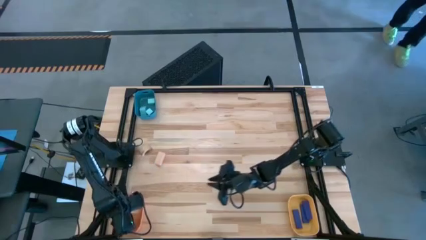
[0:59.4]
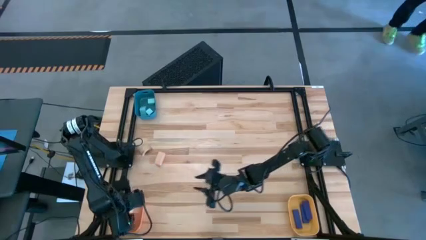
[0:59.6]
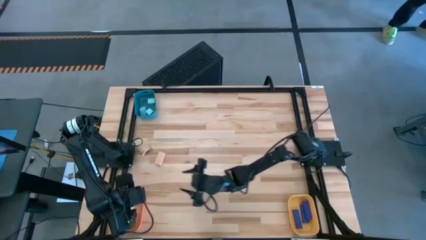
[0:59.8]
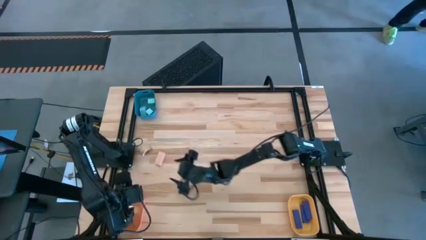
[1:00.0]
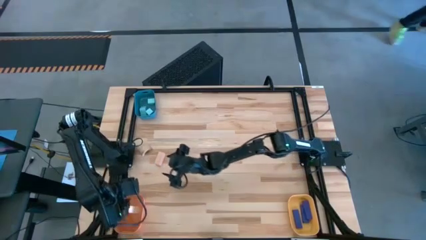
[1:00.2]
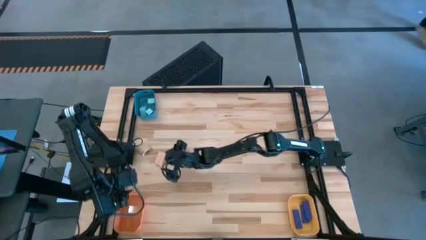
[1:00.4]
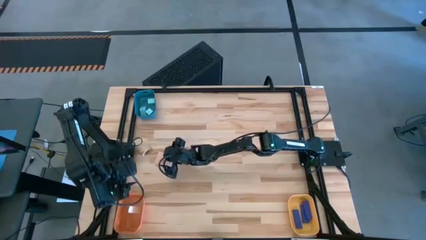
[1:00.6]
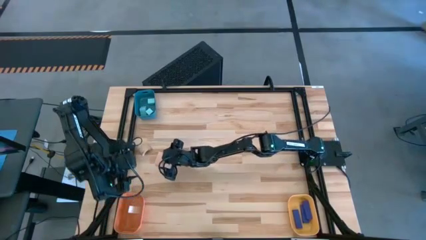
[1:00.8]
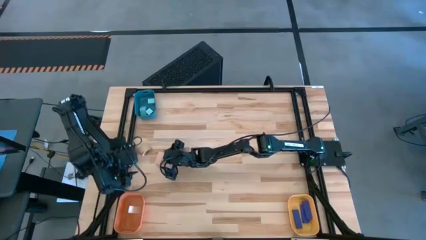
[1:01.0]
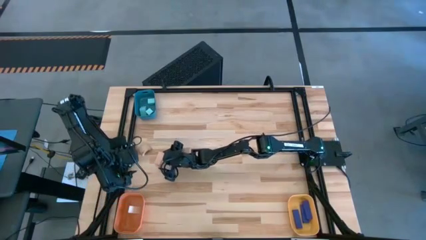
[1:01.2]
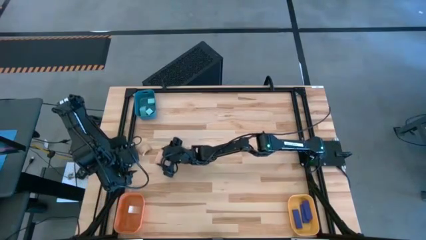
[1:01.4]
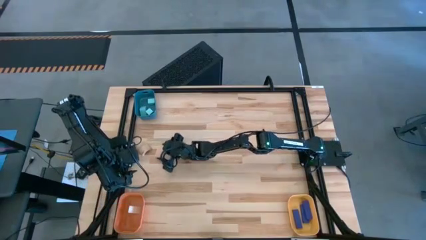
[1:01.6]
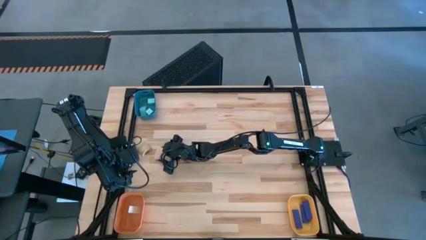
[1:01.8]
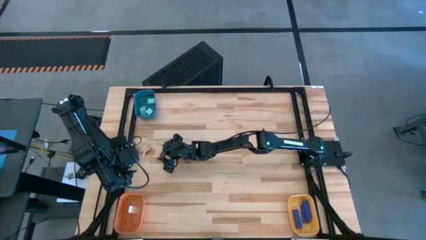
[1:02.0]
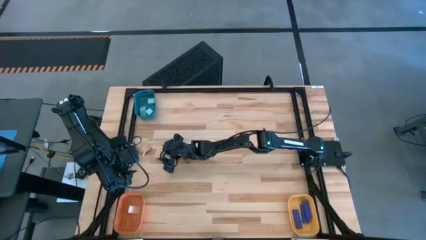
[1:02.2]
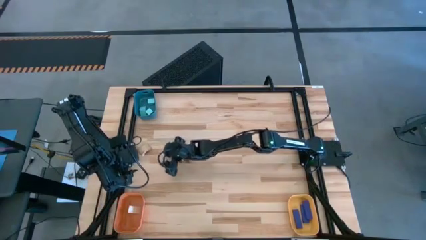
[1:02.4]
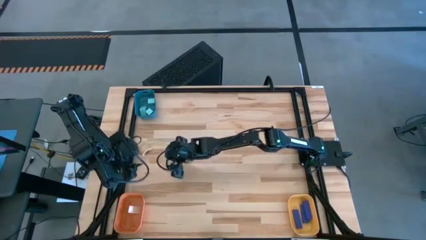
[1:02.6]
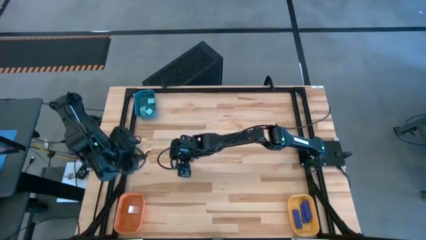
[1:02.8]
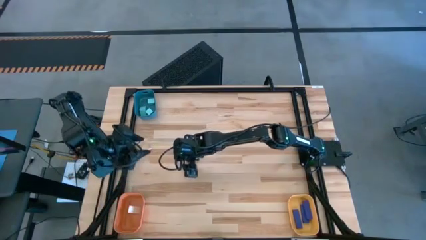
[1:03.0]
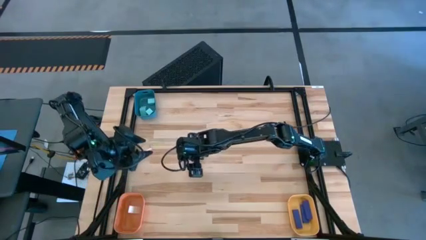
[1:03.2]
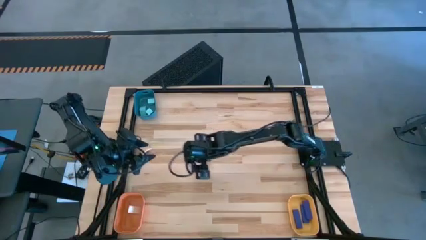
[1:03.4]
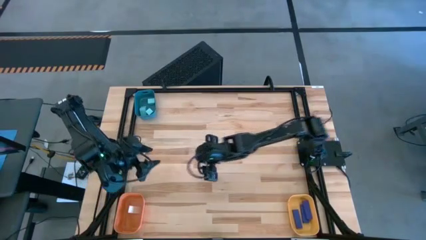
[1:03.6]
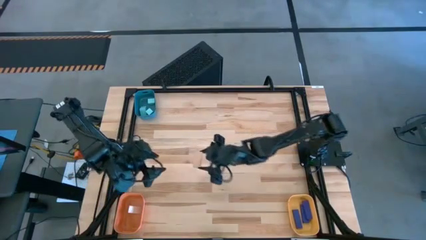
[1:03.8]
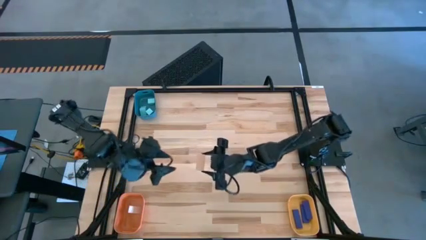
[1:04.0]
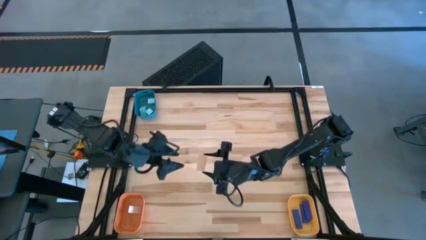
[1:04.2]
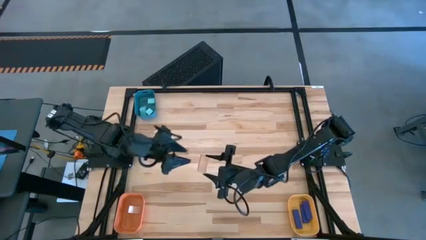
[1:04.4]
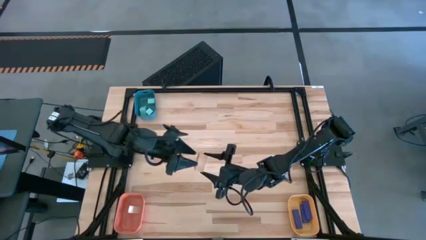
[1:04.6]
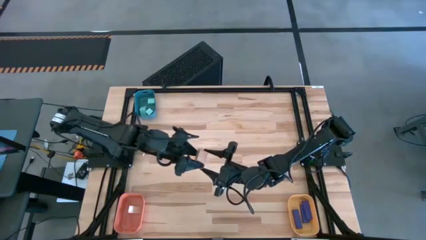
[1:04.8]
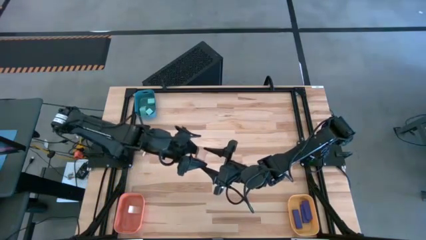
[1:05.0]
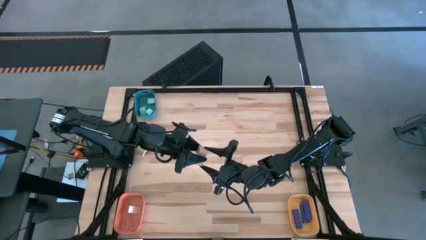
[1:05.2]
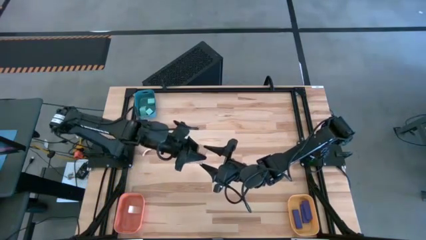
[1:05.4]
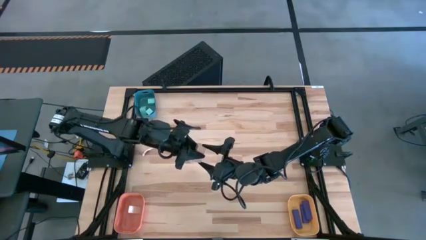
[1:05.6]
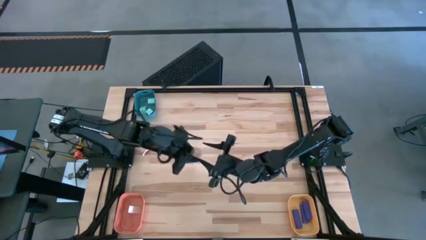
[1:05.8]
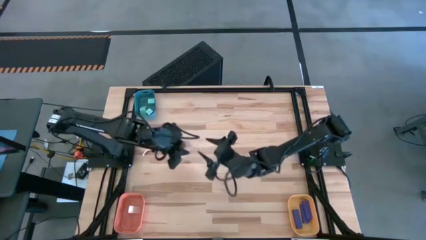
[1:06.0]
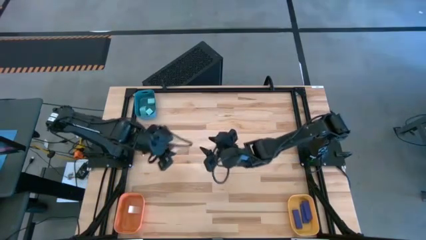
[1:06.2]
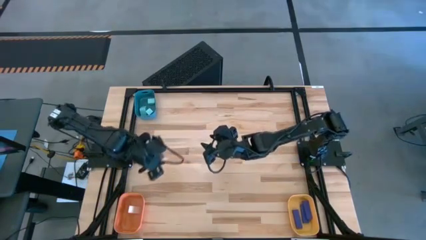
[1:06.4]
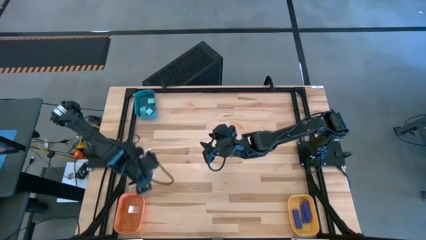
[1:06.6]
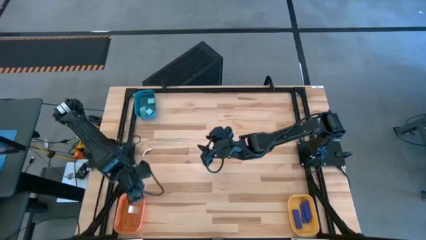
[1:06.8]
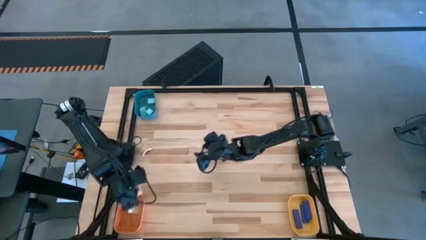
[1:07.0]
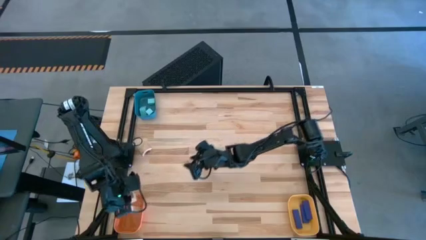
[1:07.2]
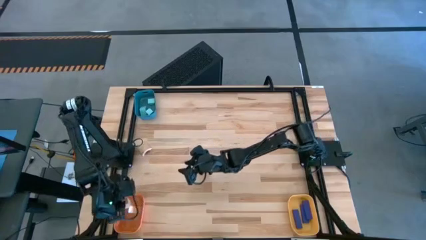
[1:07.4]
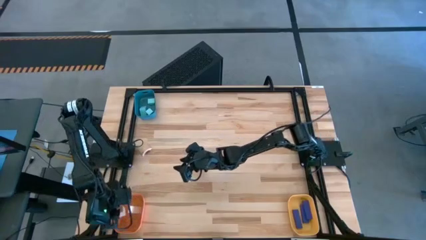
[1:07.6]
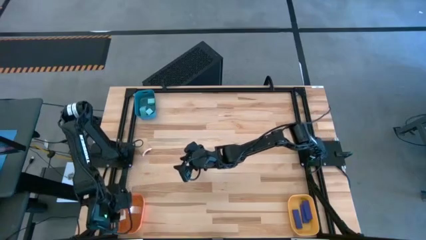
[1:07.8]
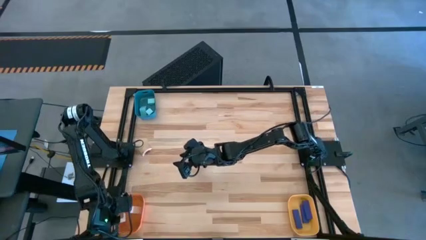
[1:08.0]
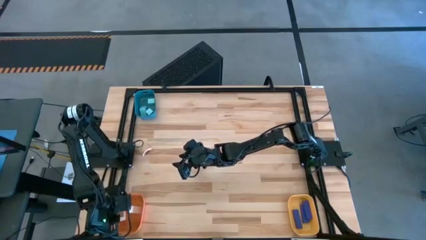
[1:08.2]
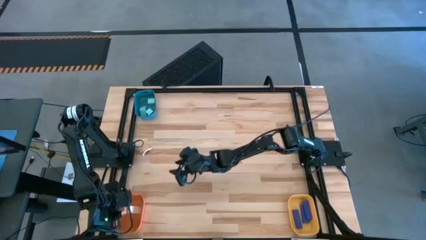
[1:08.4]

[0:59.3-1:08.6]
Task: Sort & place blocks by color
Put the right brown block into the orange bin

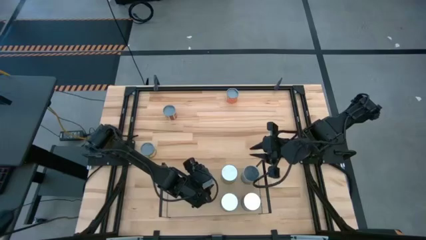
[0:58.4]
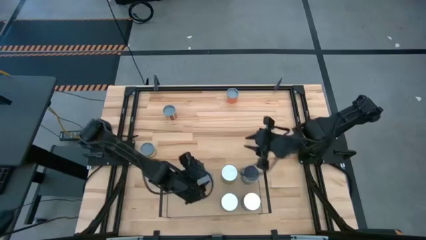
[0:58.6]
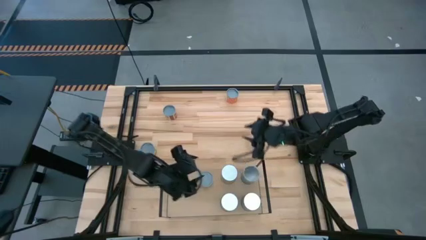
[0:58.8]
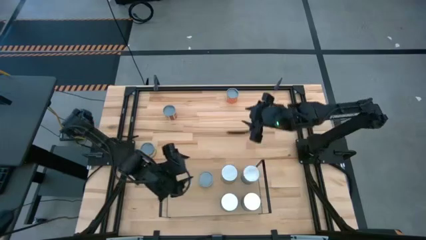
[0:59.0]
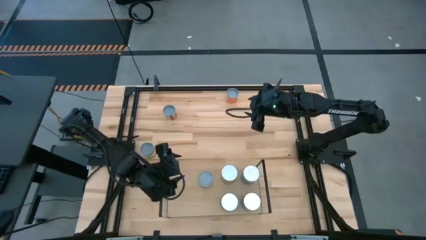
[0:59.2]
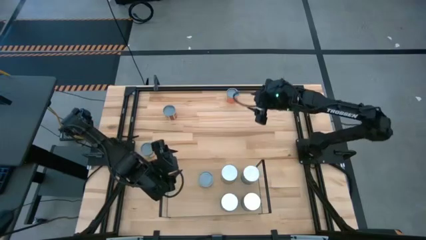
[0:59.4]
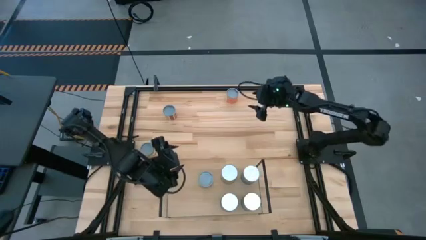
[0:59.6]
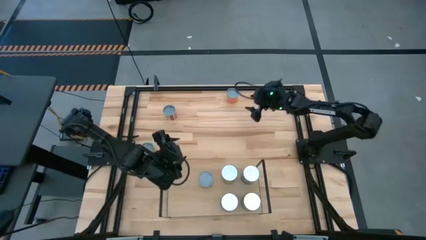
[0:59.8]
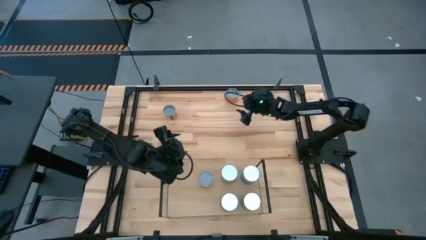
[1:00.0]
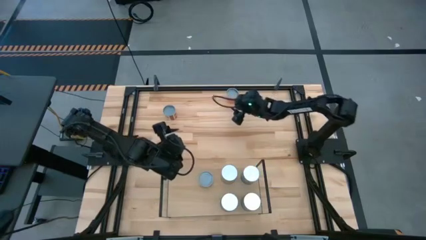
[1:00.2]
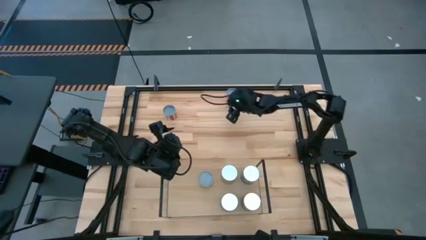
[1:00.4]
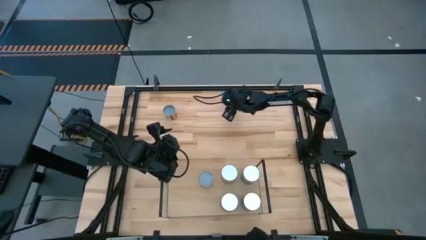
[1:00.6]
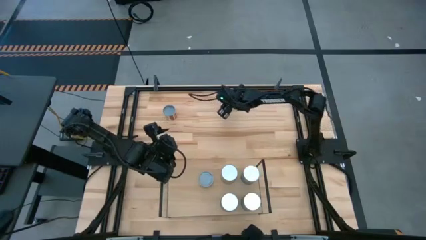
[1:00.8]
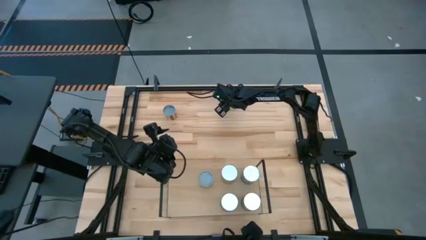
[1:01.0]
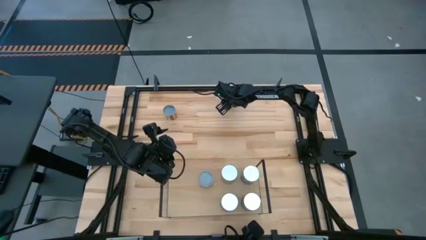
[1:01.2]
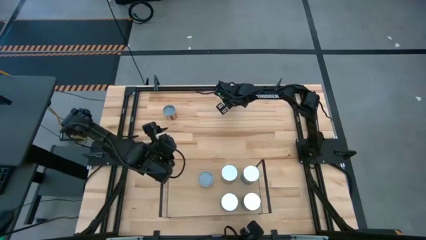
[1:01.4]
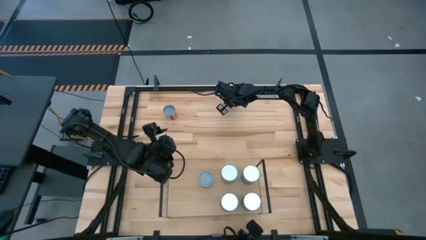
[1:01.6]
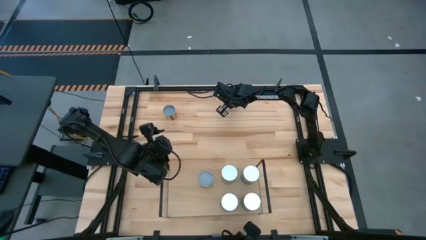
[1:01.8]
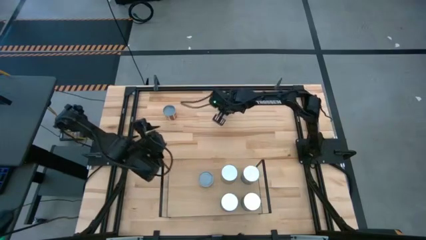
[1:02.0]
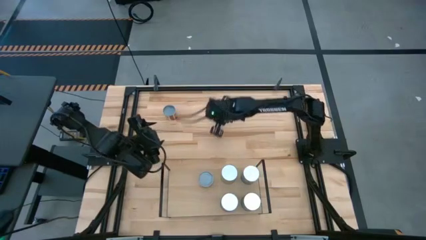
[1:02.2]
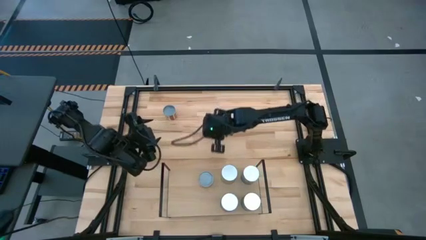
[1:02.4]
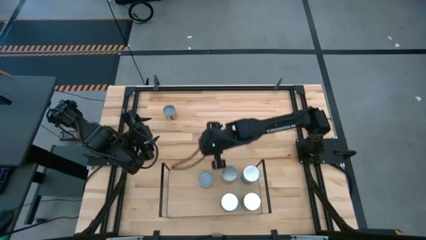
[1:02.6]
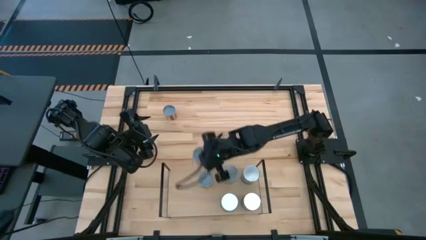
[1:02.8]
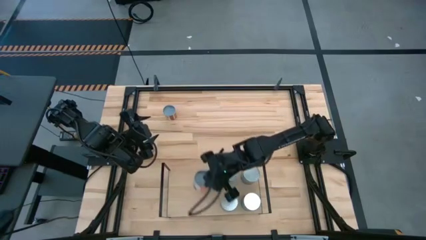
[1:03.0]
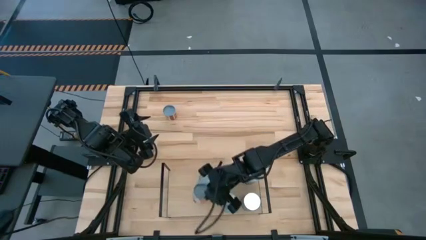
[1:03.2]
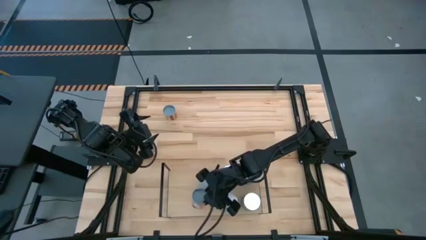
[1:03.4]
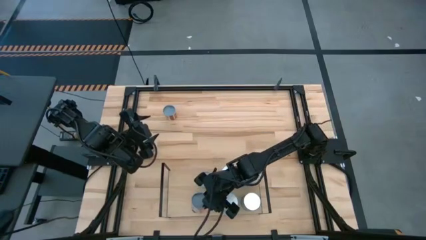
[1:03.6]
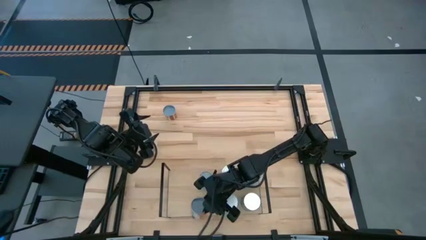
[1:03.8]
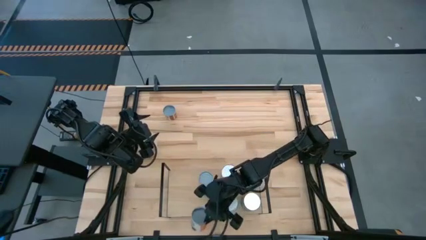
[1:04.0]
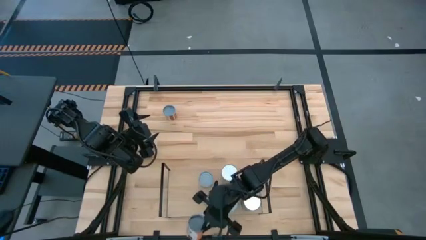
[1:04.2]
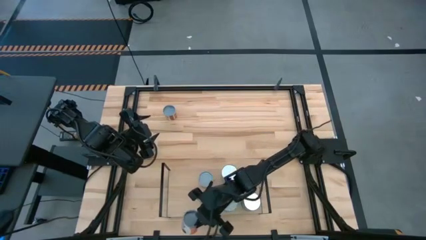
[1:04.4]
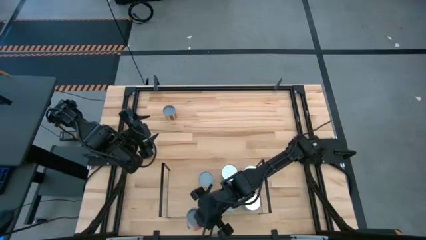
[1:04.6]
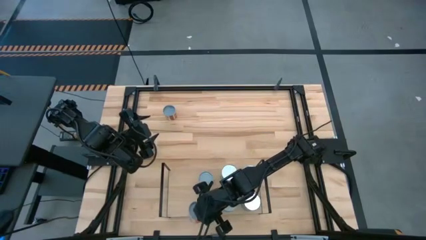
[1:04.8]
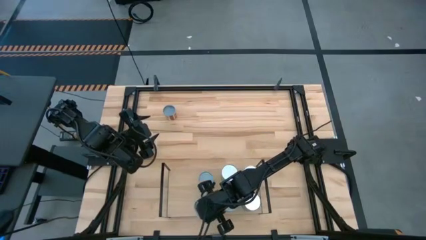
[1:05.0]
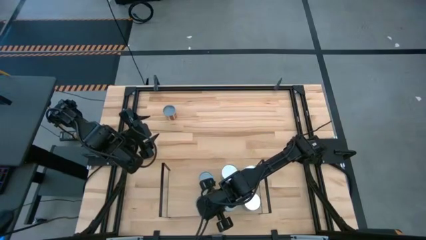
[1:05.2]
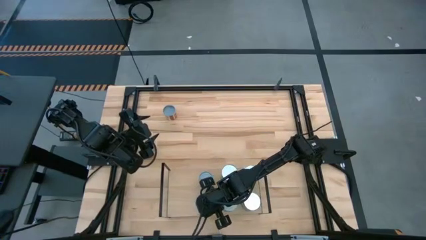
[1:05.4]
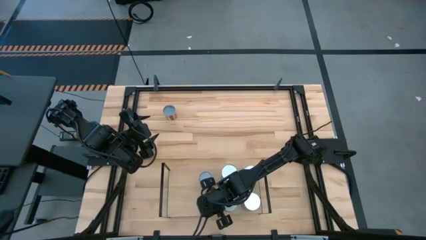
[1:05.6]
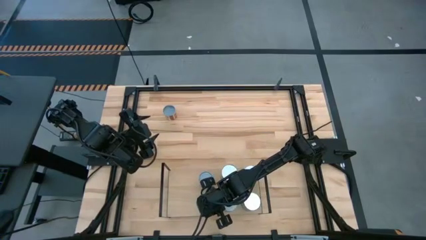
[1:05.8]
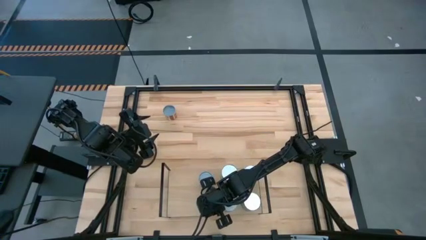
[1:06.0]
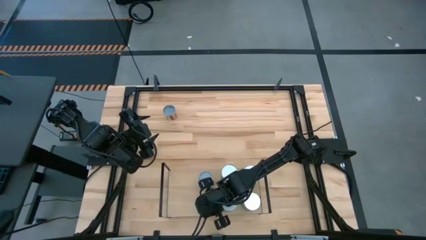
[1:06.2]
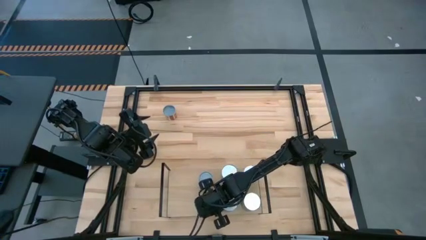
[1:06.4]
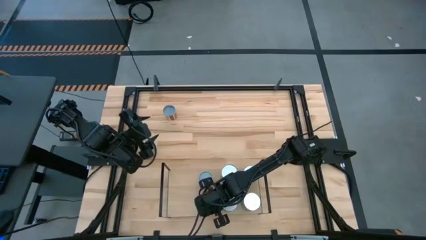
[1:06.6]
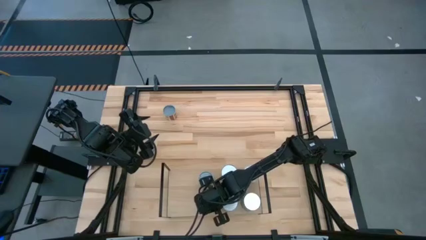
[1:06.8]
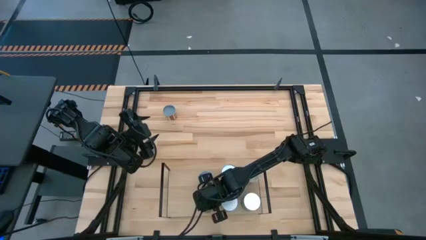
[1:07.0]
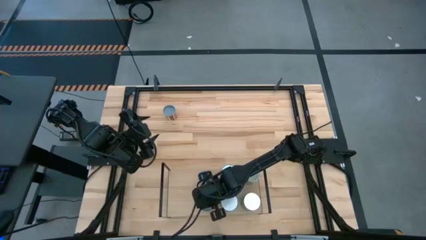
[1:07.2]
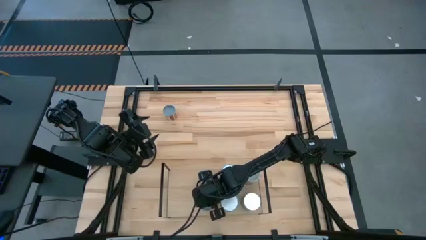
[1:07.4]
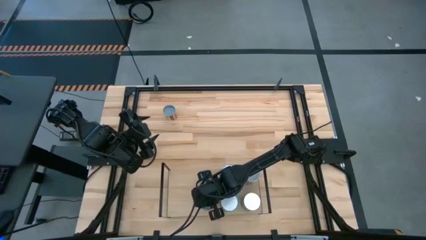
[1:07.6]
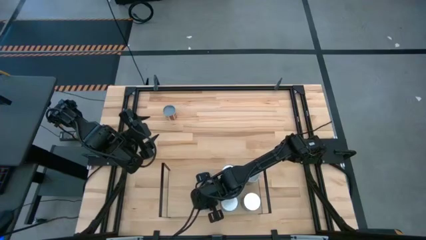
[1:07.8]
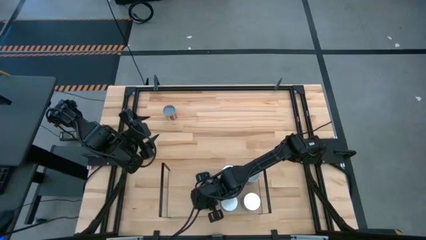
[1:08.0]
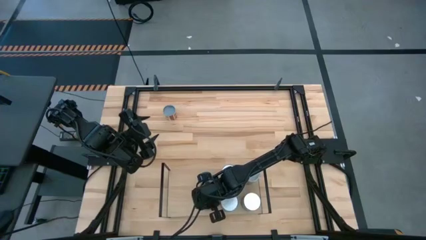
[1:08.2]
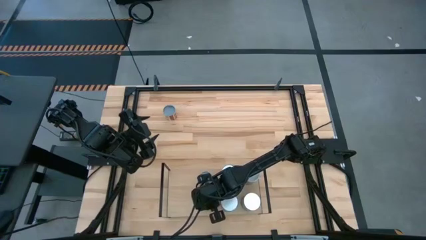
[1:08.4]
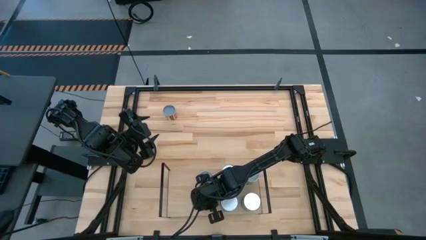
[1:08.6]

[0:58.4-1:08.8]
Task: Pick and place cans onto a shelf
Put the canned spaghetti sauces on the shelf
